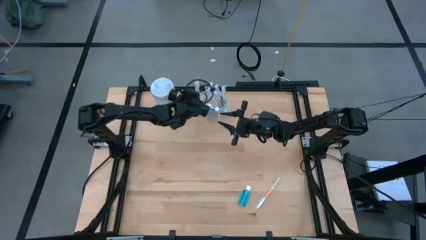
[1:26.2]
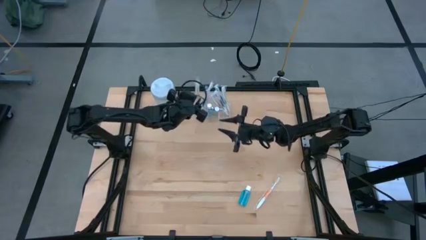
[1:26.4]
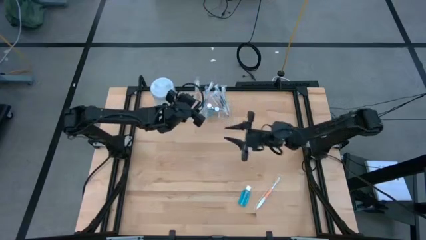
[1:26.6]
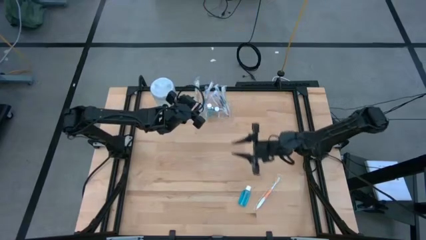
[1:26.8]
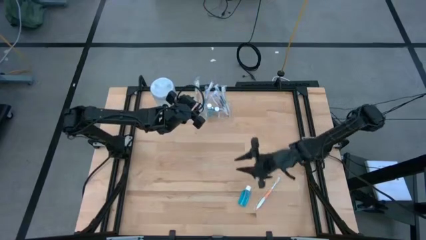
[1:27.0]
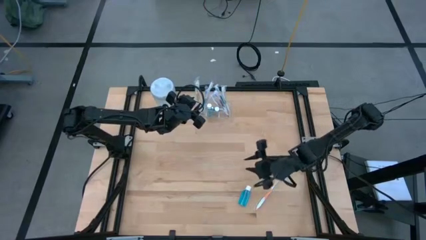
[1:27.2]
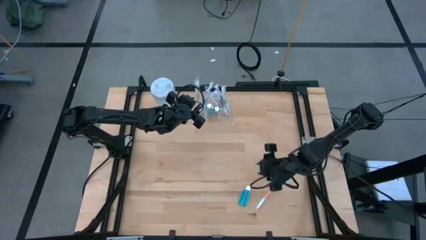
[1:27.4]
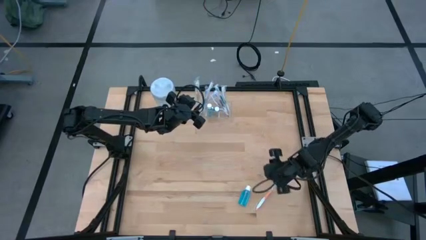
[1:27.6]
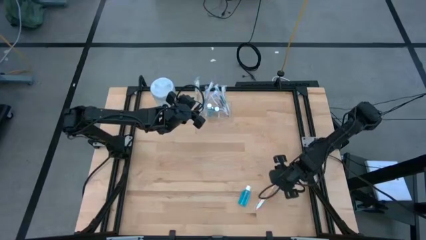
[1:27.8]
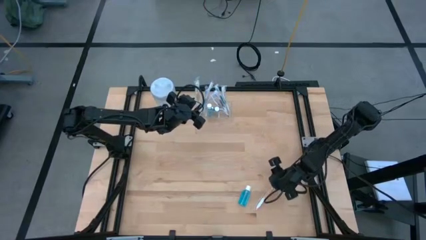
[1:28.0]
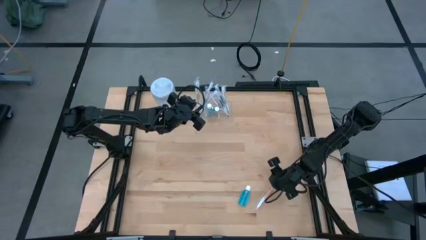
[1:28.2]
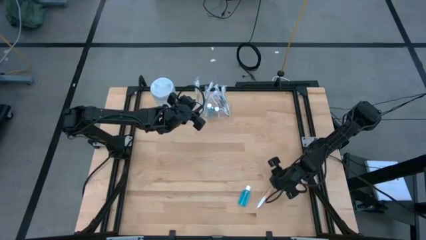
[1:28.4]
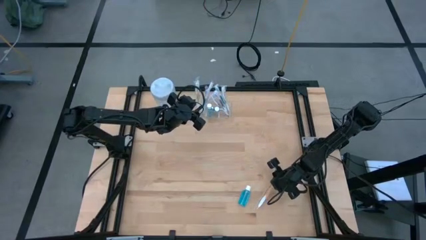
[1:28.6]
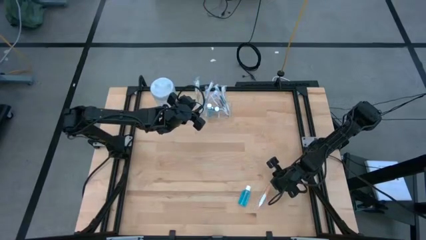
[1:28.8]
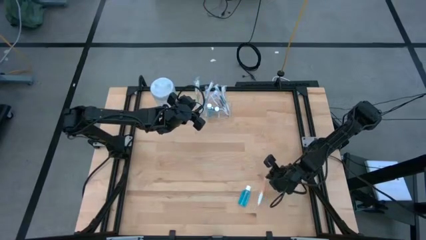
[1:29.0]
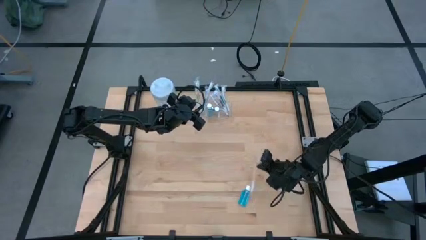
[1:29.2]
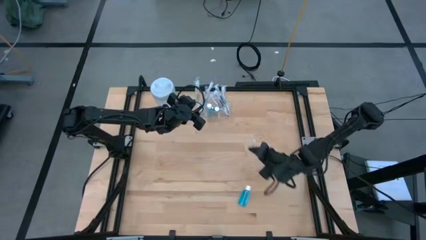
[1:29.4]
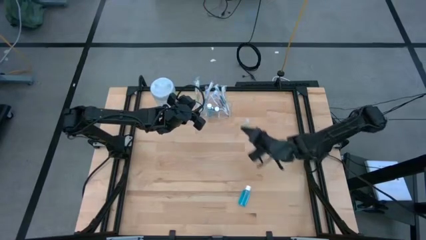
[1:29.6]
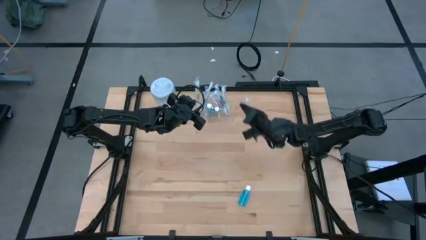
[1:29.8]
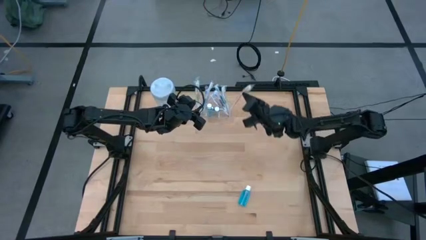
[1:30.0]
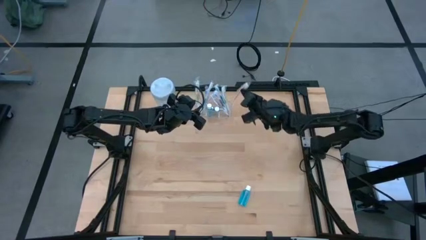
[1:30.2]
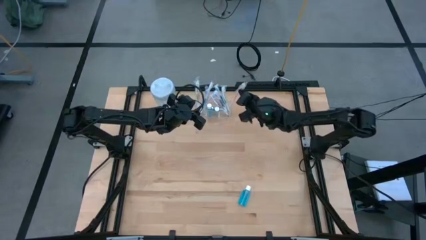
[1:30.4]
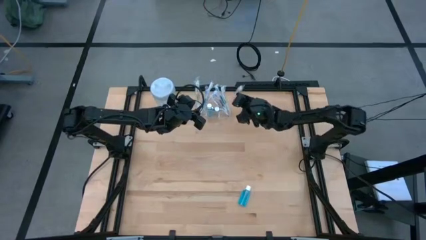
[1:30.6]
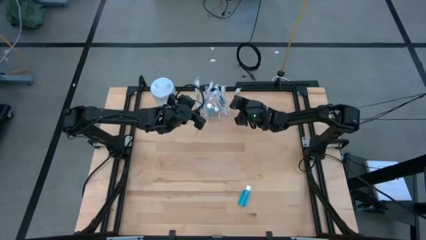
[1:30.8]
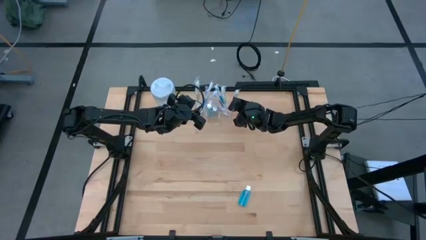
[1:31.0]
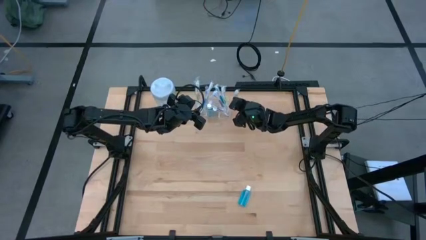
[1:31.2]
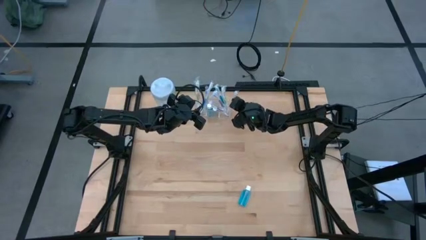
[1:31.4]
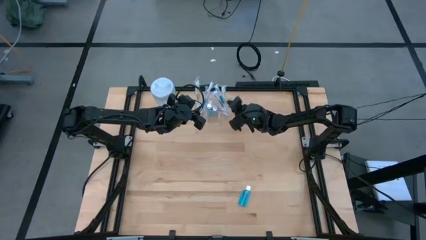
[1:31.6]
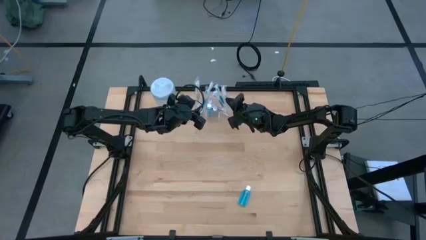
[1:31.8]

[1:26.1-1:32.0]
Task: Pick & Place toothbrushing station
Put the orange toothbrush into the transparent organizer

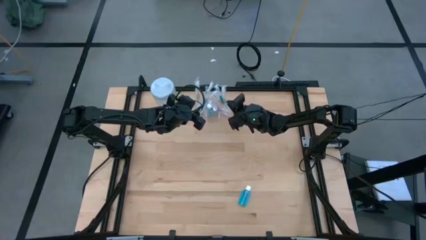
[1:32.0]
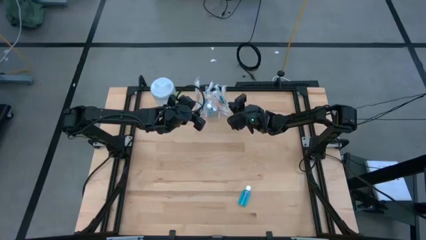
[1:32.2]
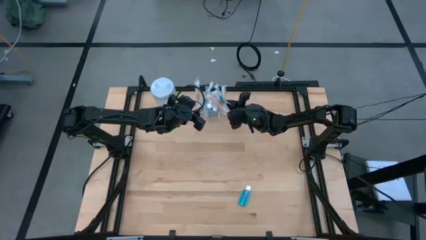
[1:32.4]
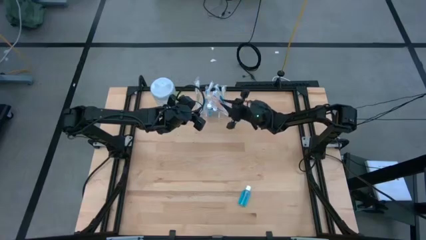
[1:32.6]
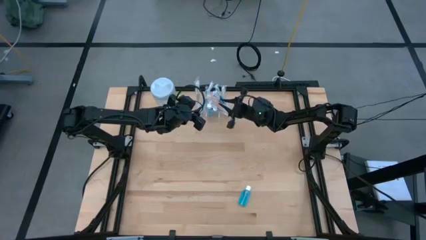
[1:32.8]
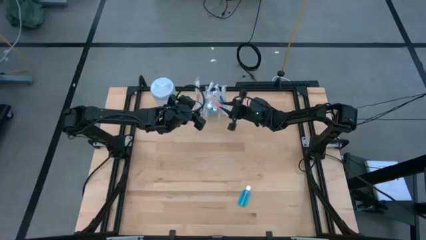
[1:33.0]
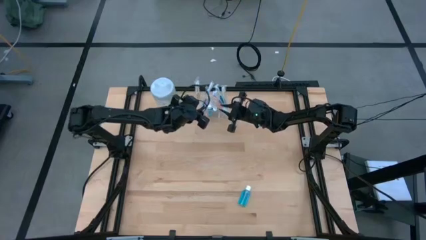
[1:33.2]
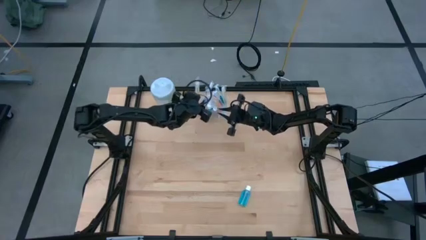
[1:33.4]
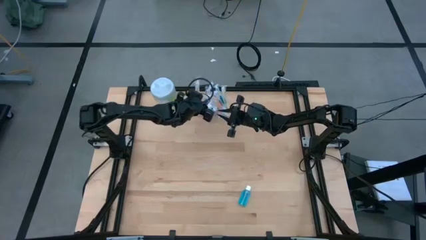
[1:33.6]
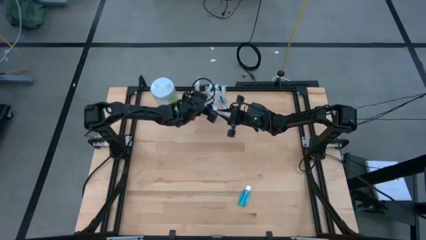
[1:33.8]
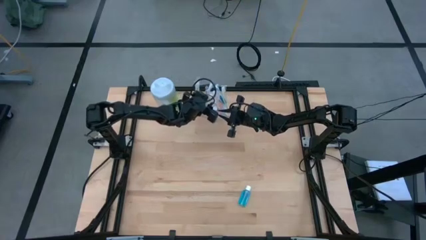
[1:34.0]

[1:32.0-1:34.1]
Adjust the toothbrushes

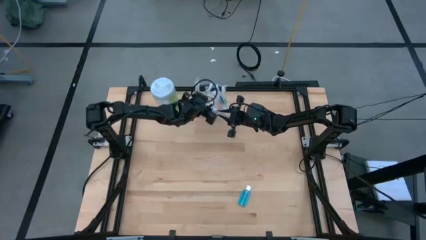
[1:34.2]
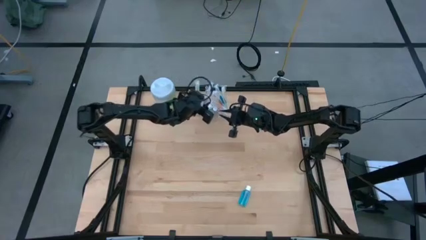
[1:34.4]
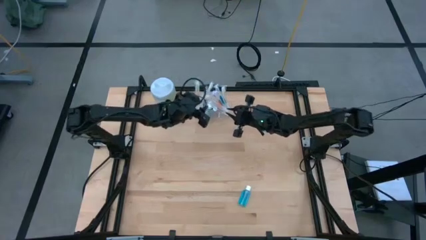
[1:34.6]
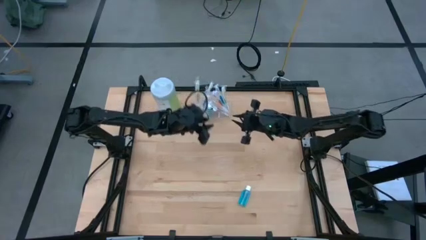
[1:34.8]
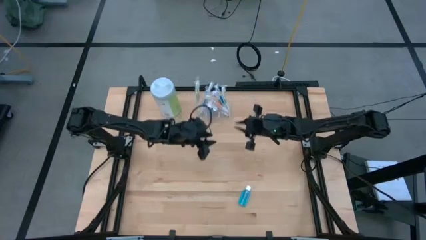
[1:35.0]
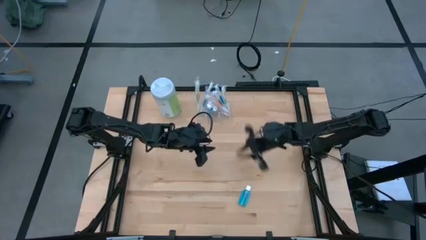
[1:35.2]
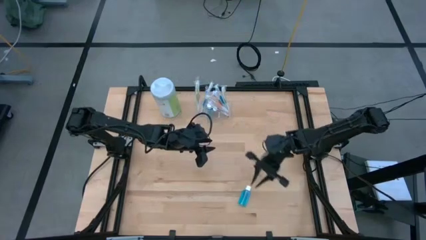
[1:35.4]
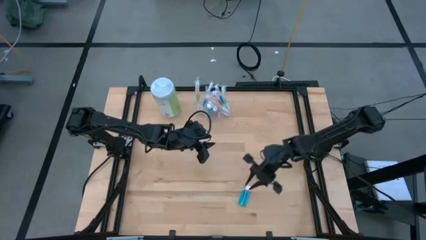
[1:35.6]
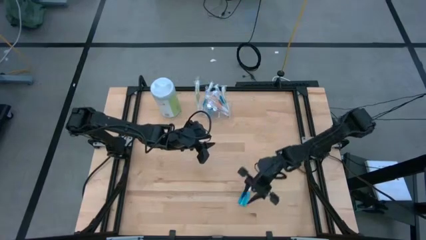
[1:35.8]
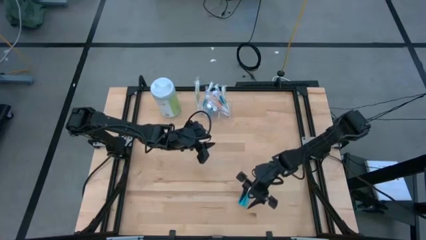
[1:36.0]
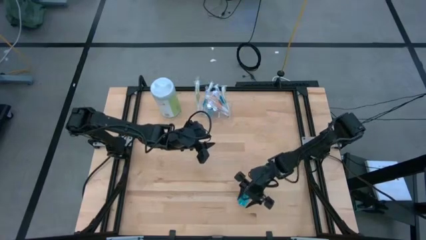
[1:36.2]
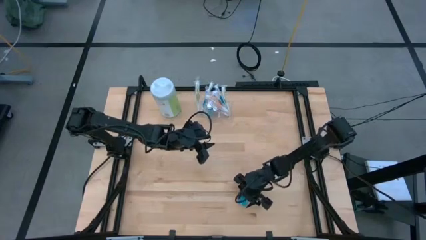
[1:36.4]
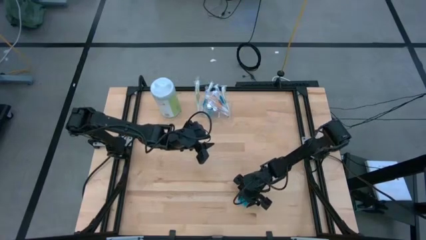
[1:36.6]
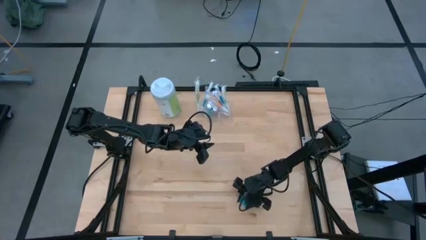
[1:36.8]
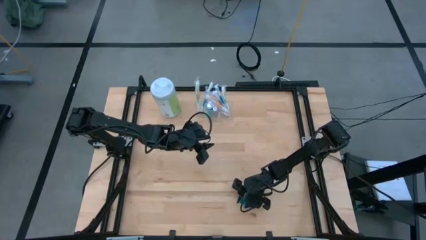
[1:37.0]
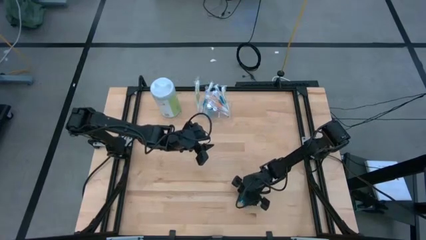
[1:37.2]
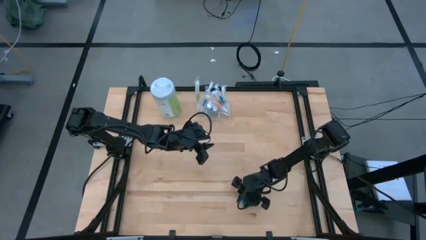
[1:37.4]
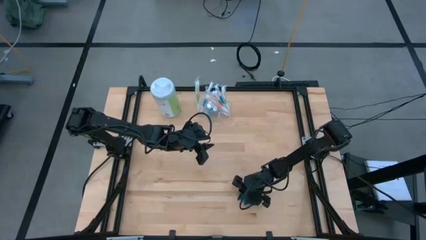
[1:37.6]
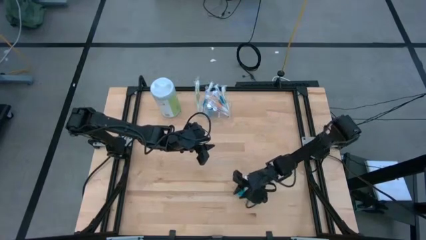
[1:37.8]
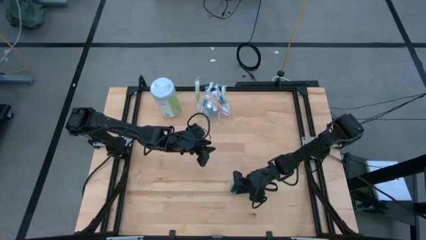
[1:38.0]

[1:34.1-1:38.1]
Put the blue mouthwash into the transparent organizer

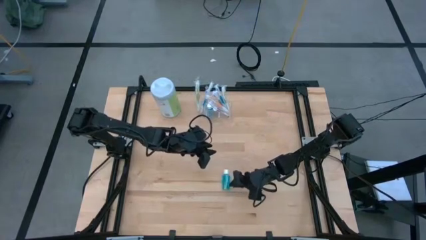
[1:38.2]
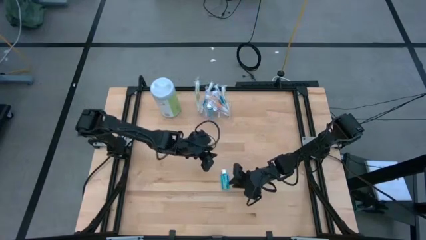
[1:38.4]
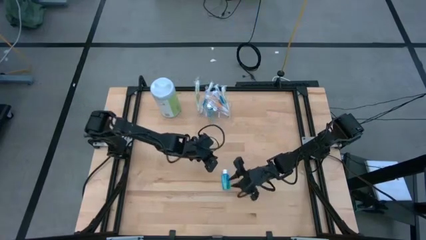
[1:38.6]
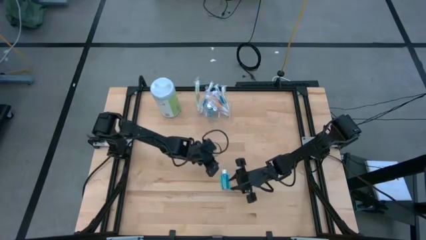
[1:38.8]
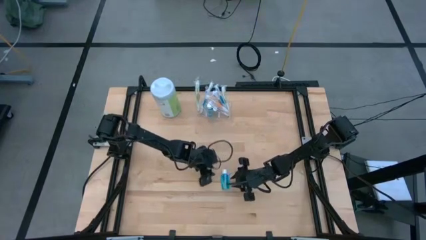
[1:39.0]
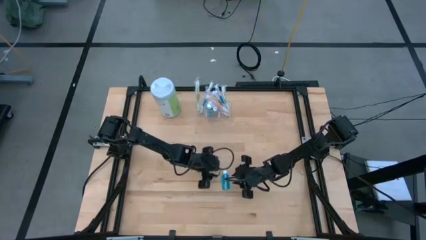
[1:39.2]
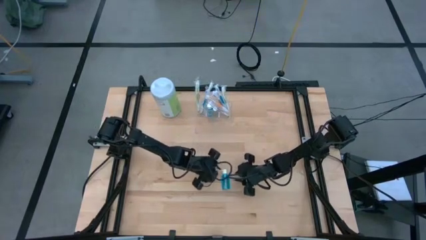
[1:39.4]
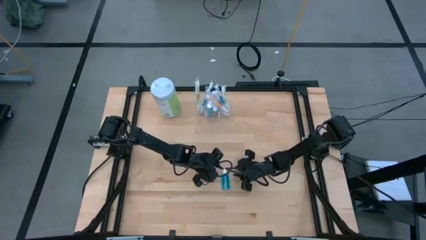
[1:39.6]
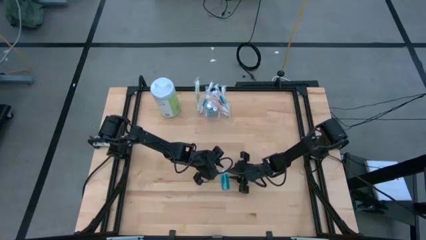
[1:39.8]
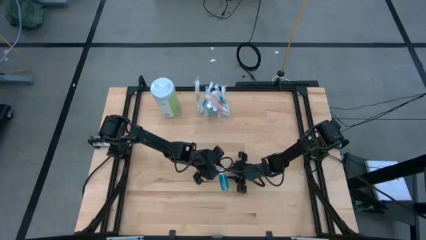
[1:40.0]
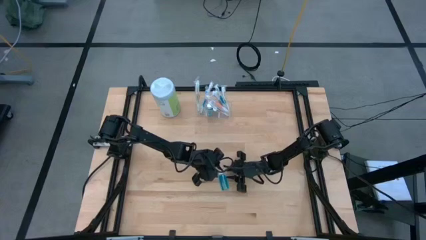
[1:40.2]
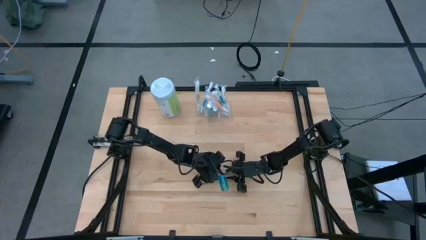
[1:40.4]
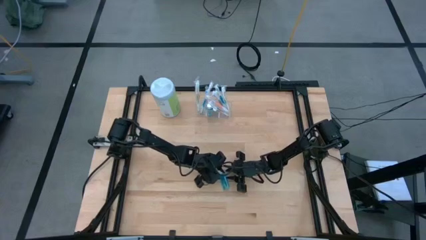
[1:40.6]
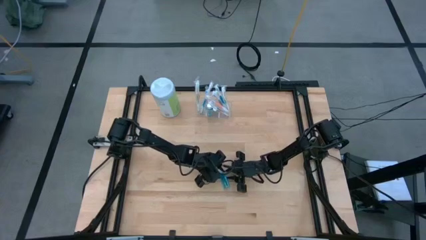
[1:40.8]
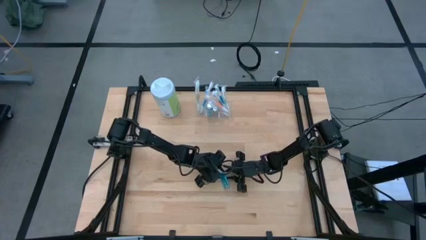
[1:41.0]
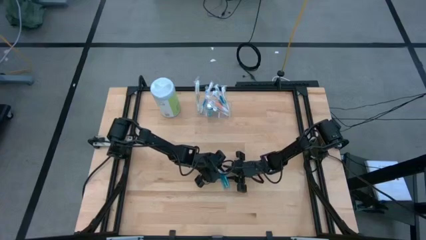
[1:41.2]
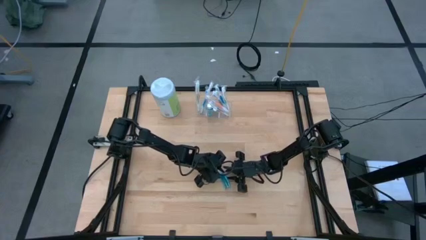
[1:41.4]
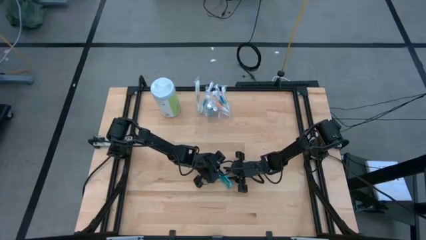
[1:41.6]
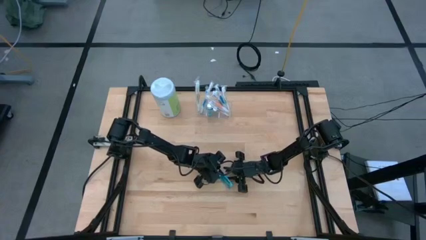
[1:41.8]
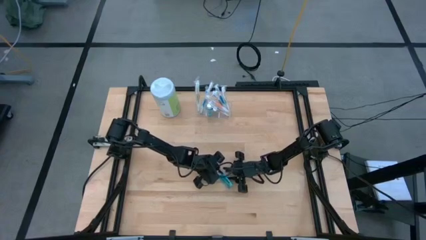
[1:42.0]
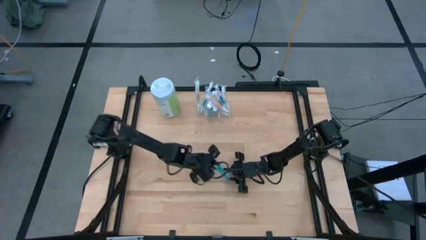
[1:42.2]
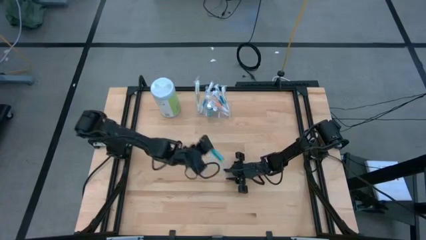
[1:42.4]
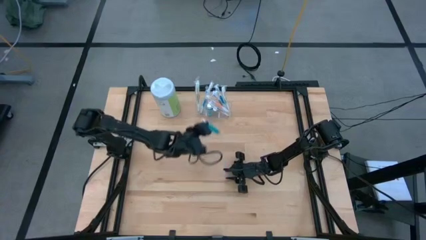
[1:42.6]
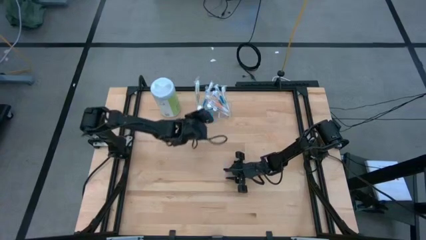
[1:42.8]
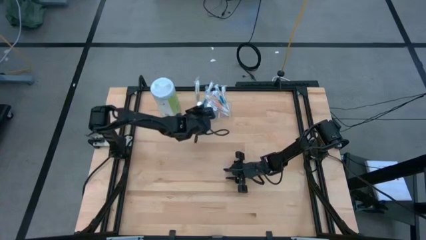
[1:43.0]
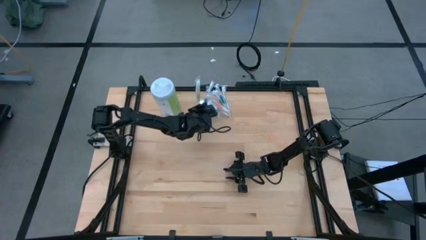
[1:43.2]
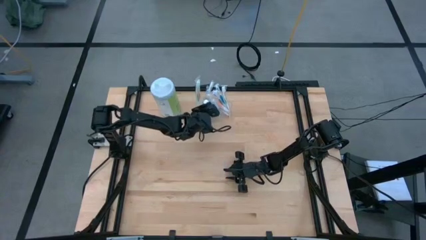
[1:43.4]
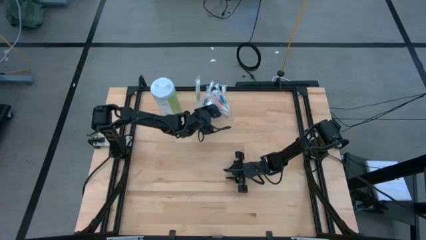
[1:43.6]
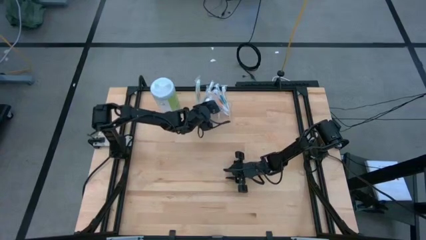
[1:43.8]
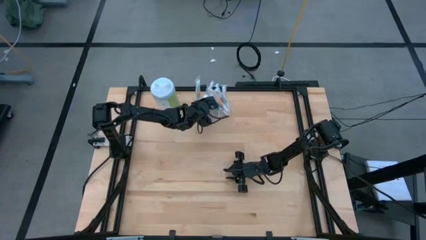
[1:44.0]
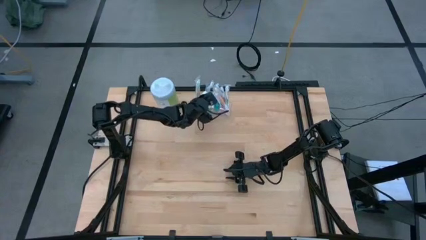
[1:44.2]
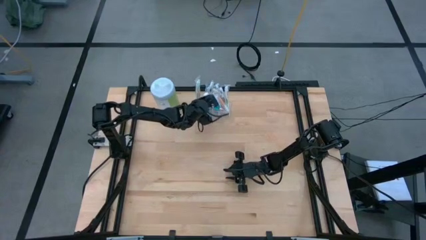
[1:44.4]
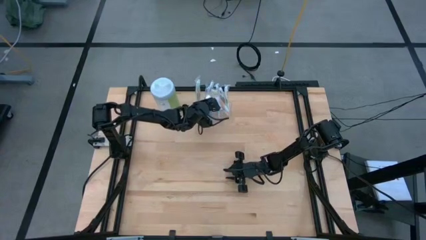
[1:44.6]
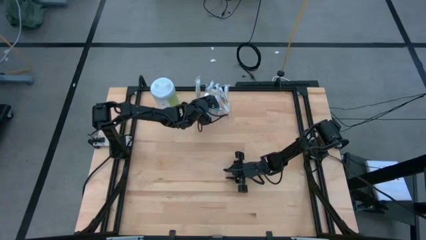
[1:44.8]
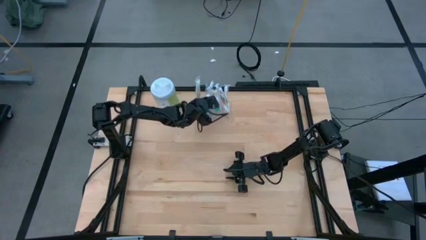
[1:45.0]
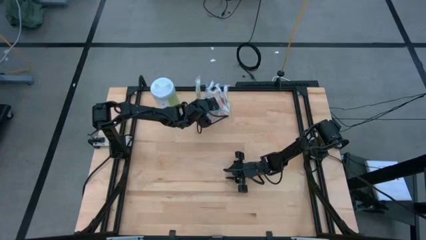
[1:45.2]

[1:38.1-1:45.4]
Put the blue mouthwash into the transparent organizer
